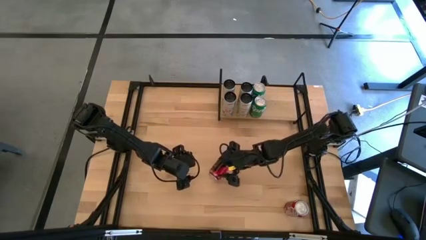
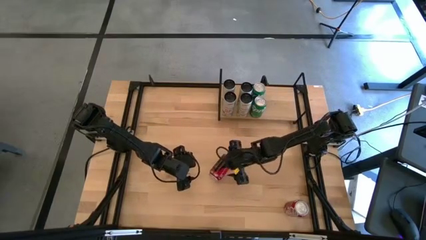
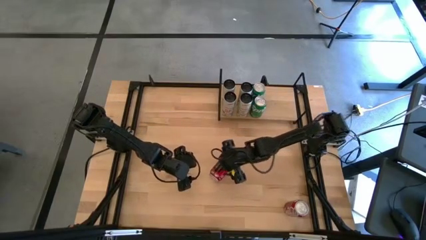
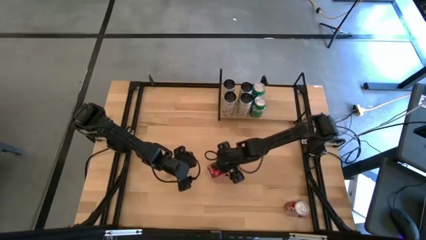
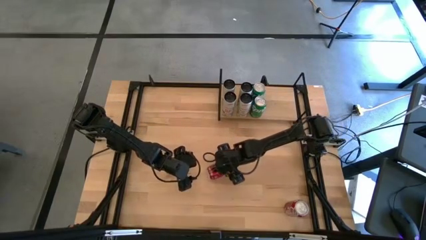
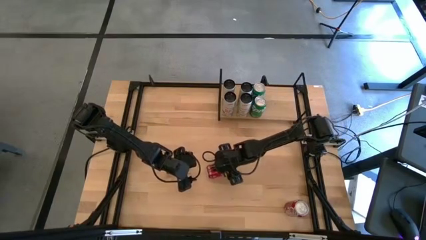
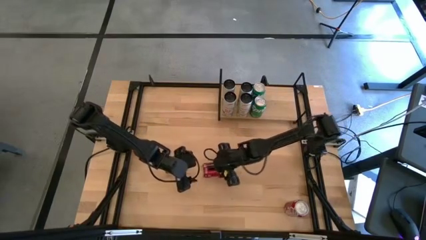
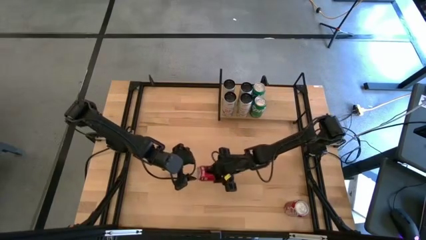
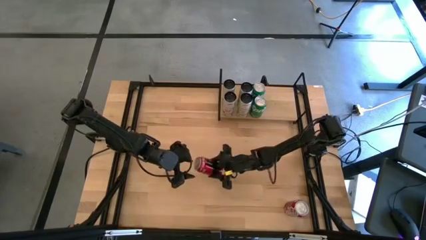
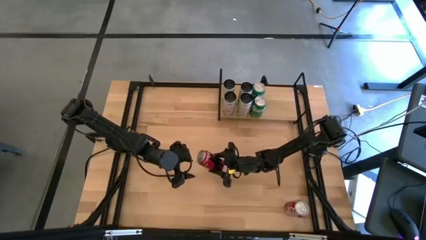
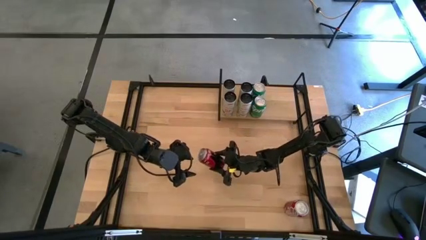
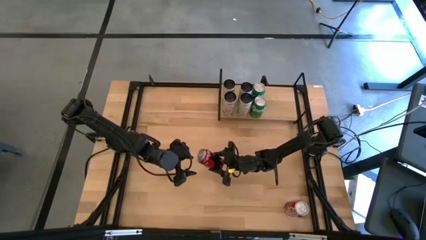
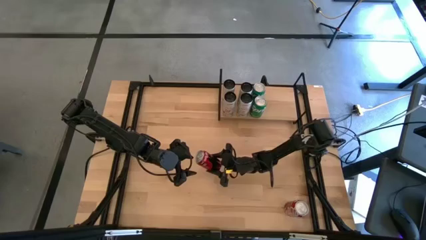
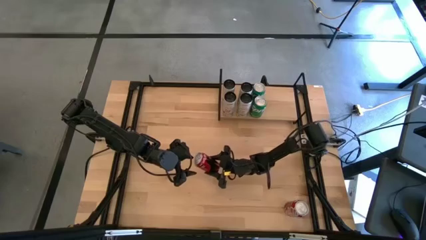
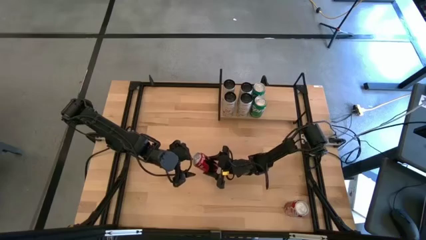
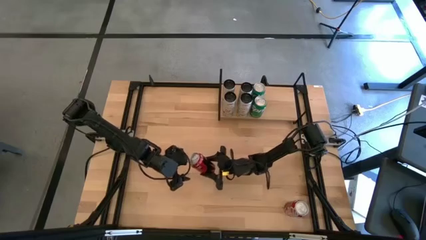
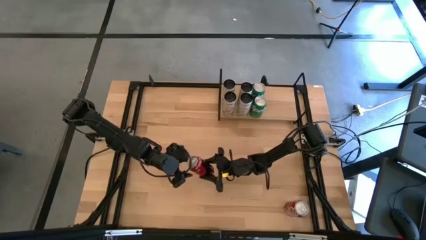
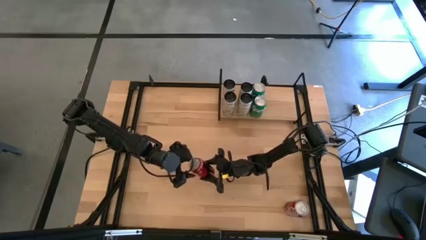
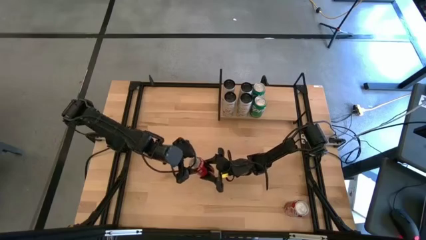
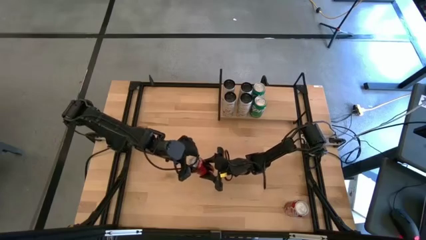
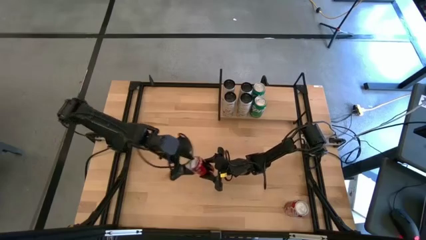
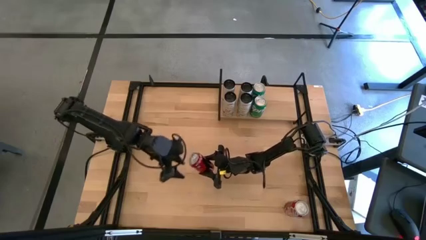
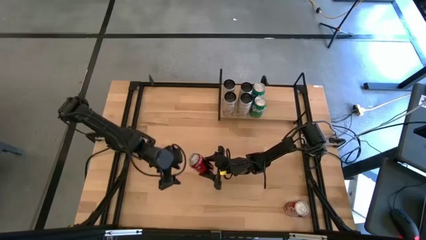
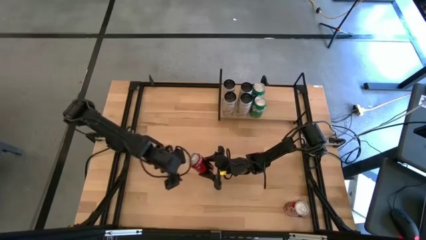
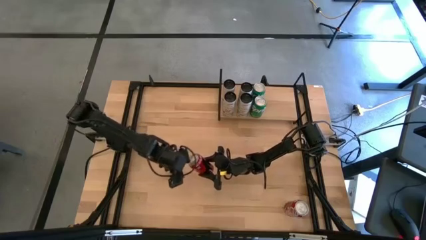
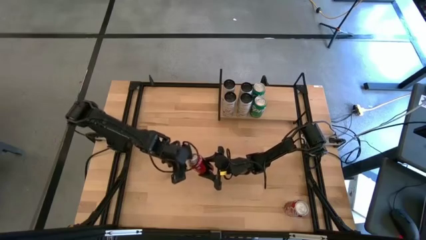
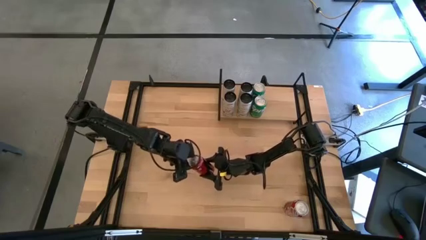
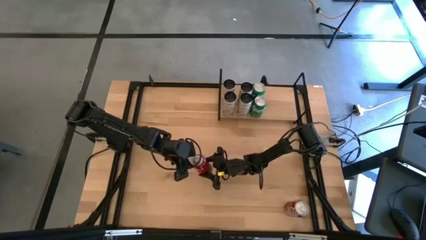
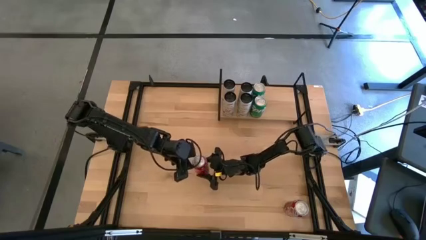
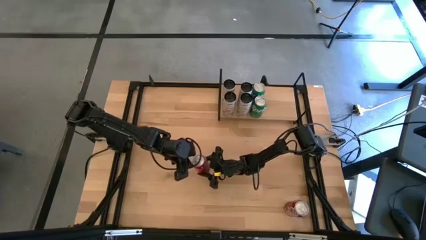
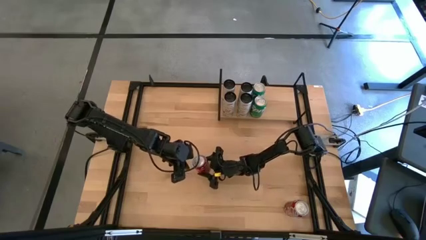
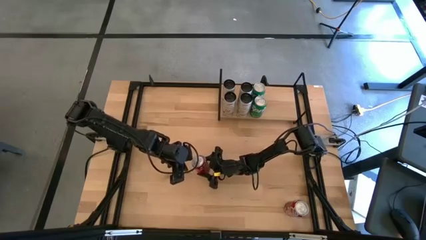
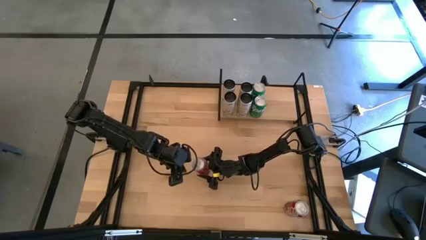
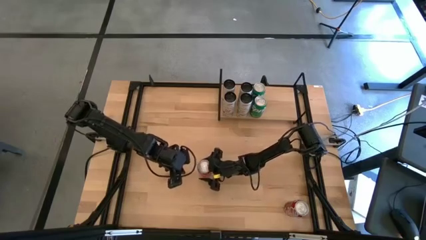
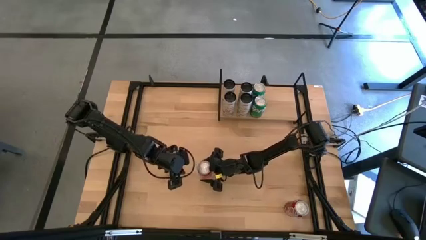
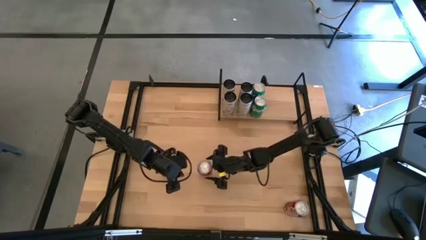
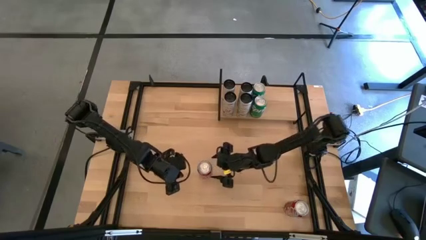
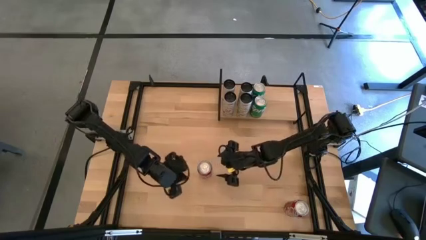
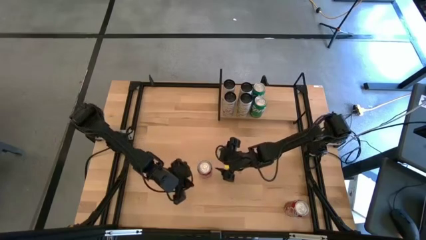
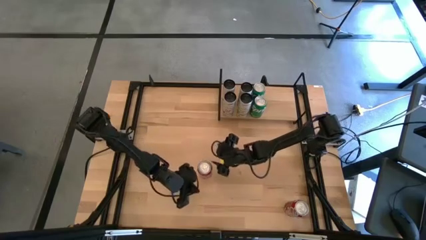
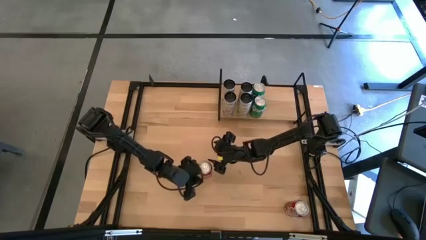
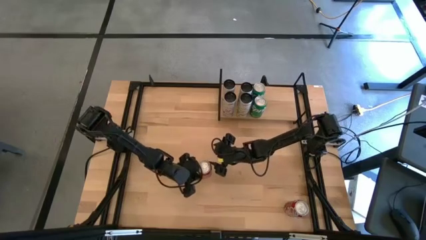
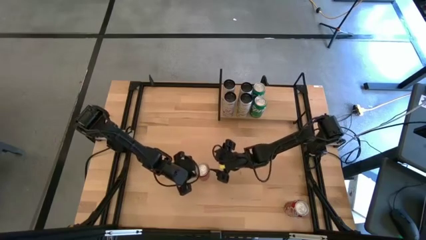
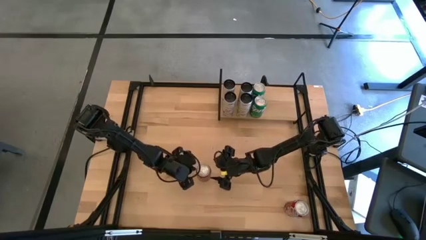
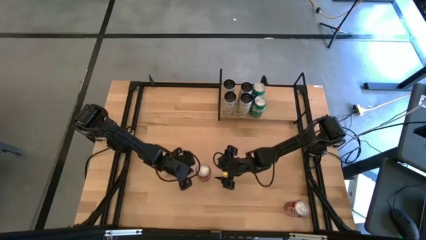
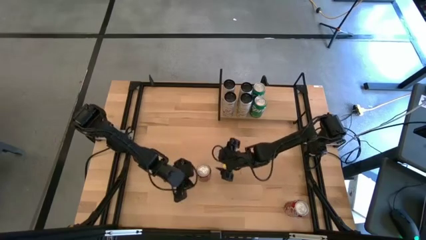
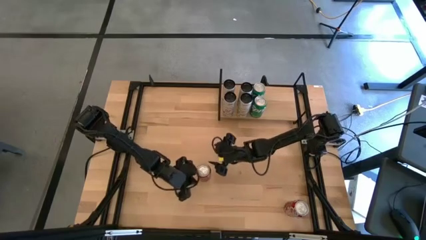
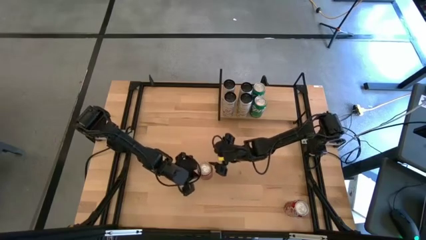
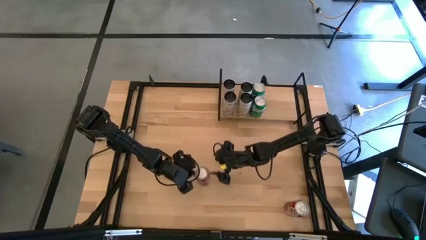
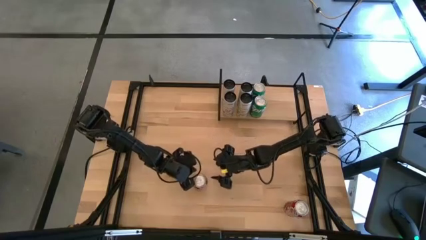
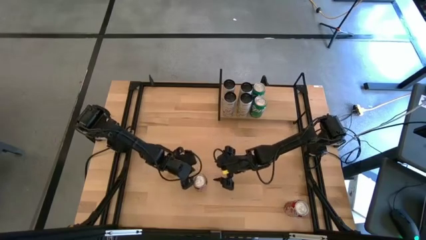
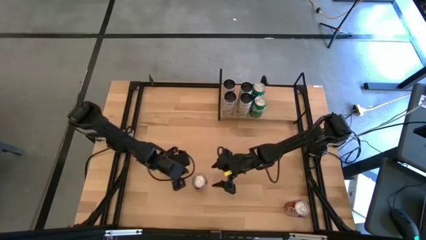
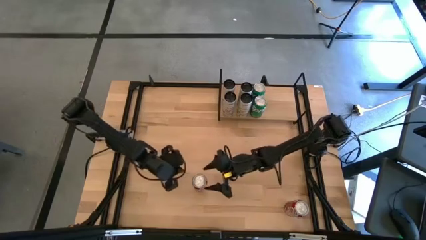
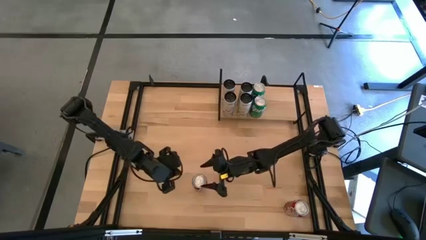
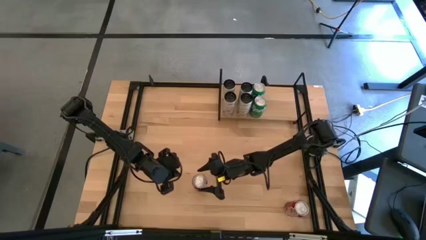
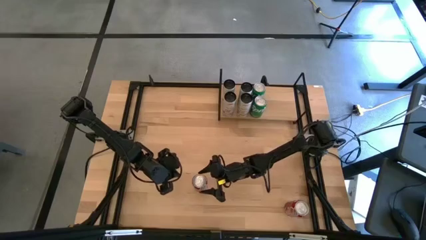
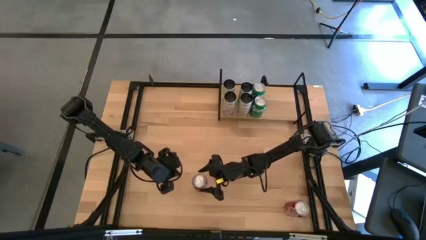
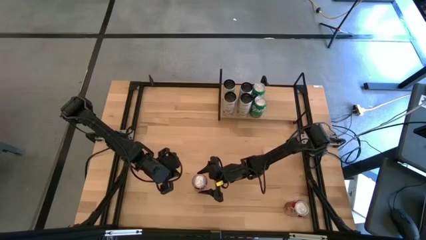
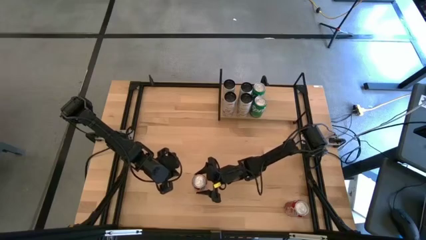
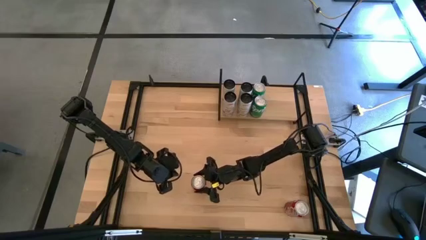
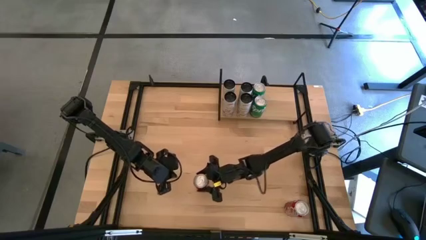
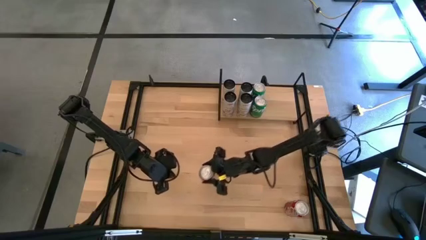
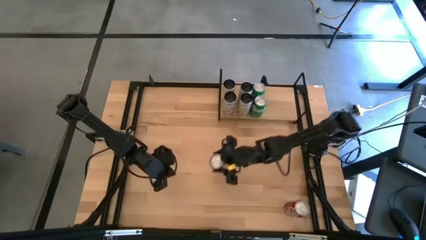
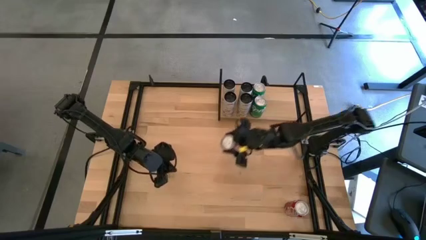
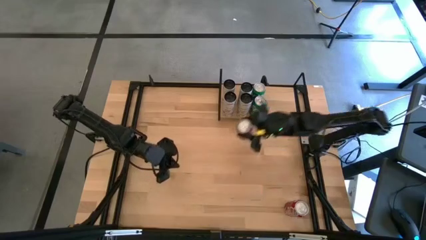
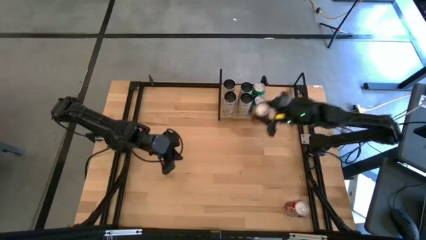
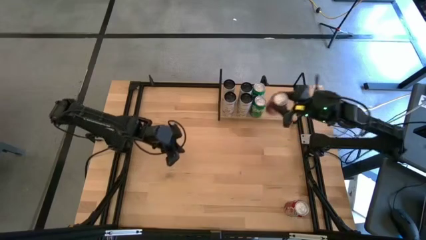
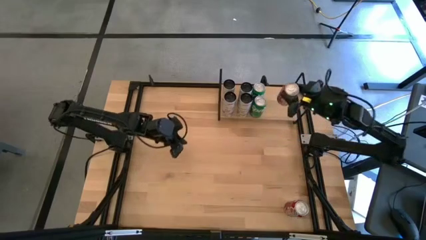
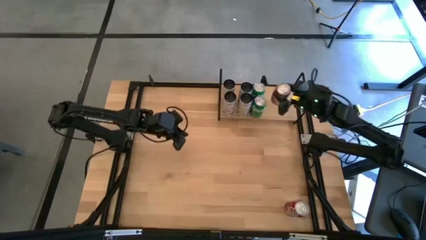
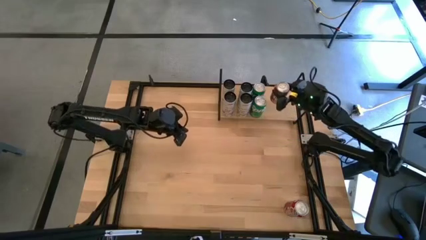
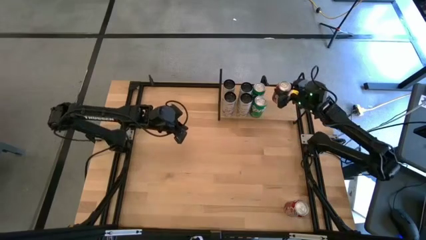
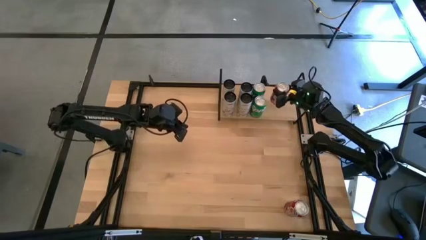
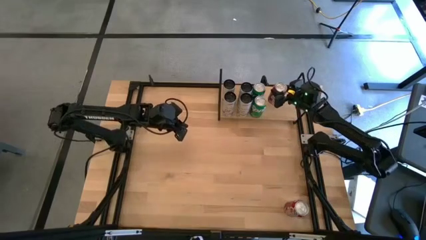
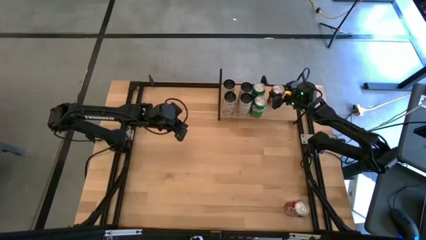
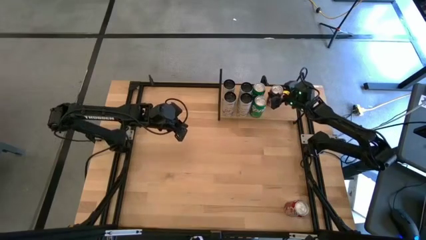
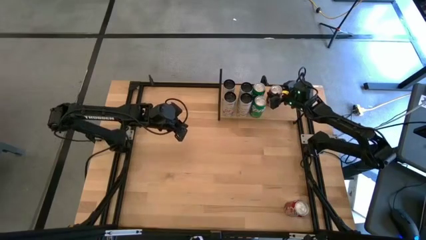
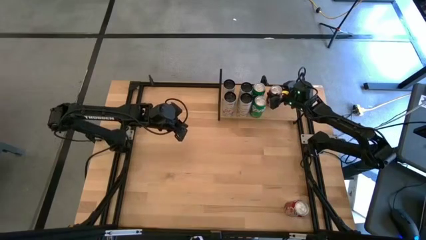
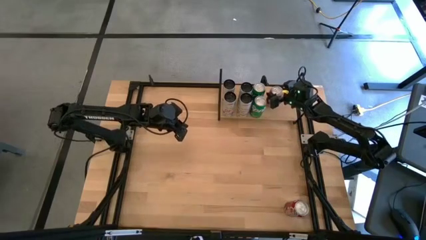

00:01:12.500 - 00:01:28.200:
Task: Place canned beverage on shelf
Put the top red-white soda can on the shelf
